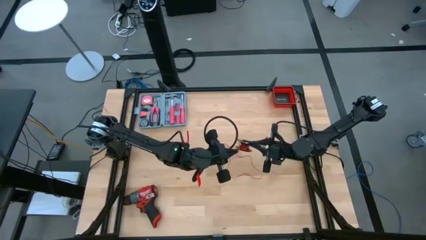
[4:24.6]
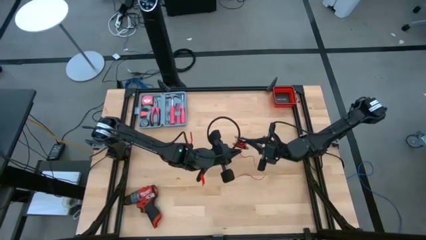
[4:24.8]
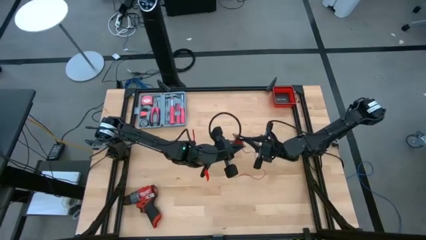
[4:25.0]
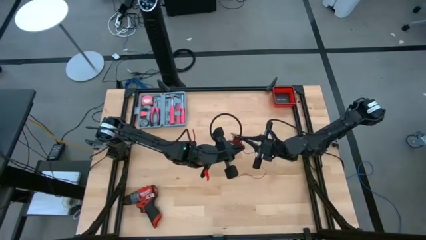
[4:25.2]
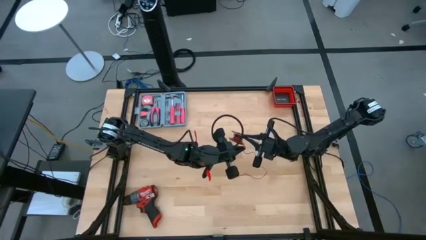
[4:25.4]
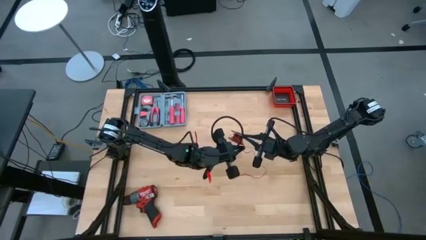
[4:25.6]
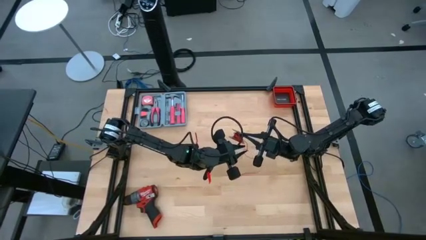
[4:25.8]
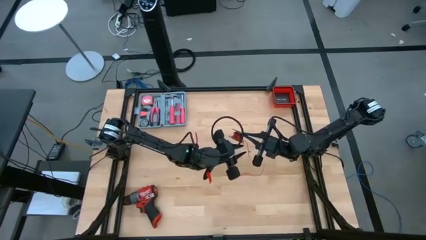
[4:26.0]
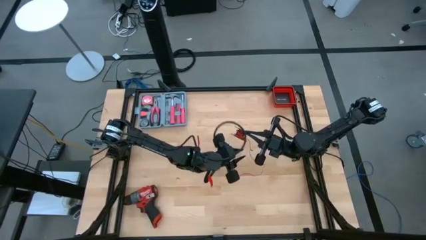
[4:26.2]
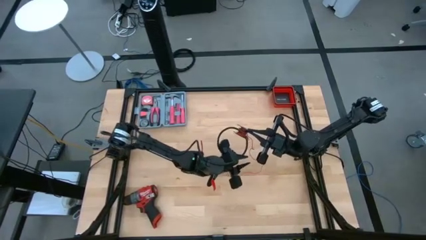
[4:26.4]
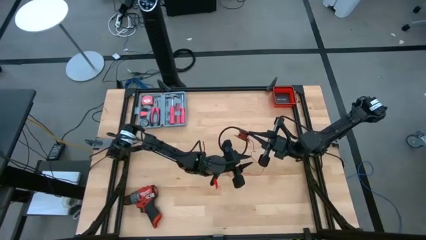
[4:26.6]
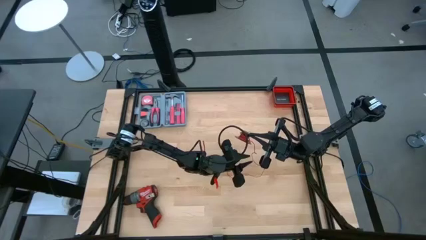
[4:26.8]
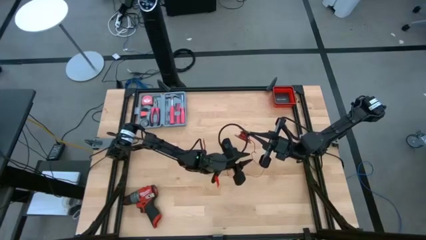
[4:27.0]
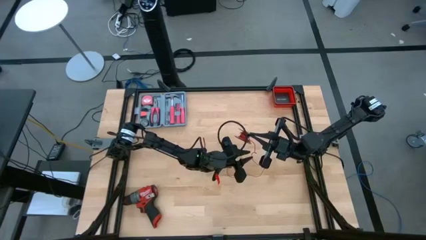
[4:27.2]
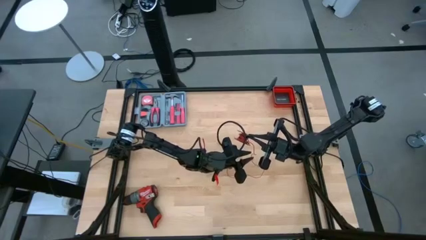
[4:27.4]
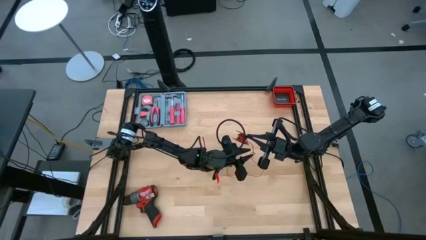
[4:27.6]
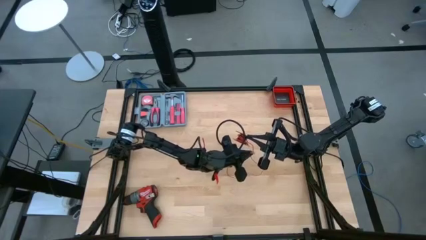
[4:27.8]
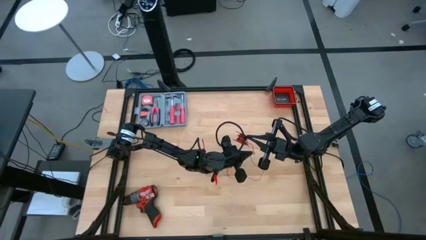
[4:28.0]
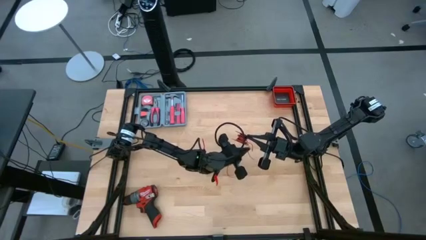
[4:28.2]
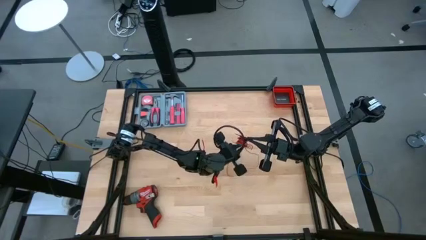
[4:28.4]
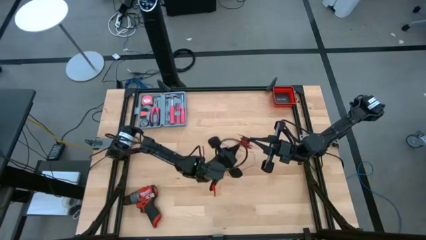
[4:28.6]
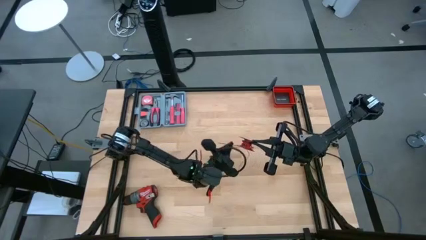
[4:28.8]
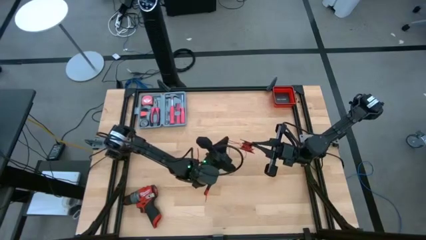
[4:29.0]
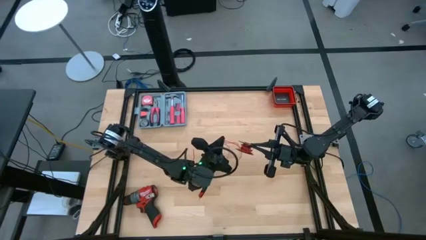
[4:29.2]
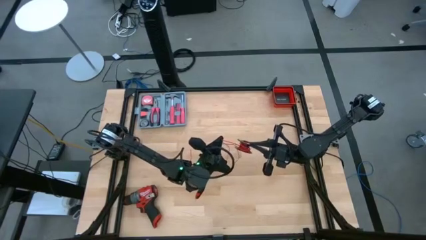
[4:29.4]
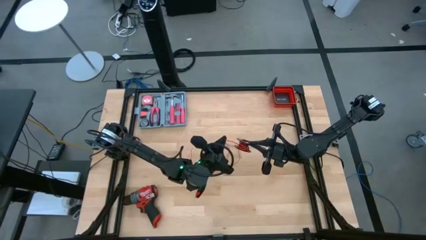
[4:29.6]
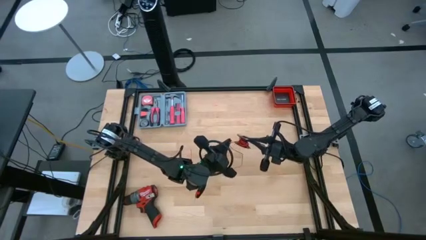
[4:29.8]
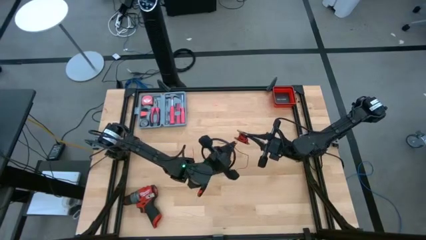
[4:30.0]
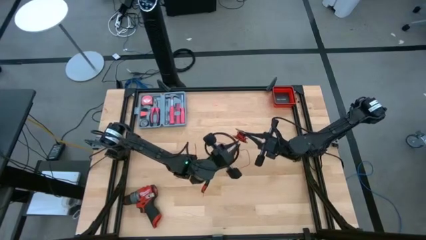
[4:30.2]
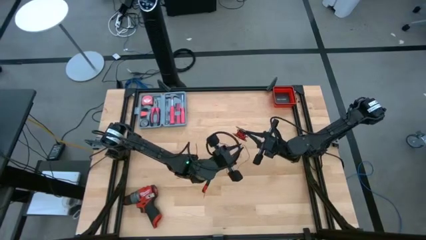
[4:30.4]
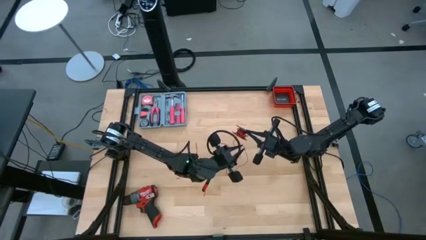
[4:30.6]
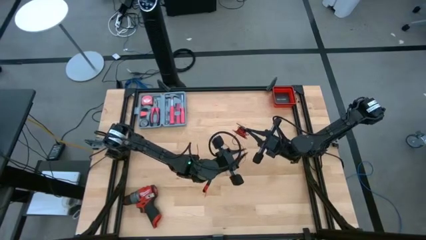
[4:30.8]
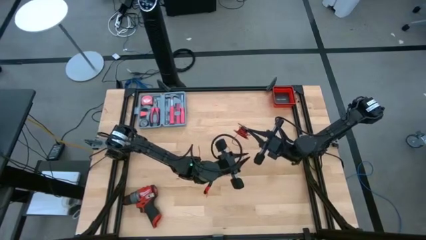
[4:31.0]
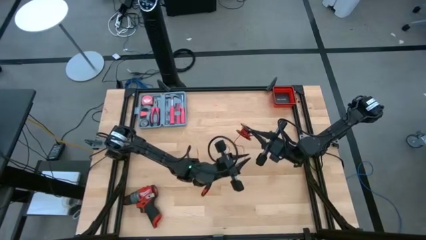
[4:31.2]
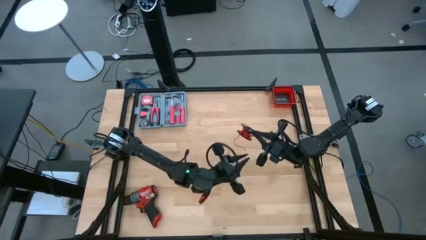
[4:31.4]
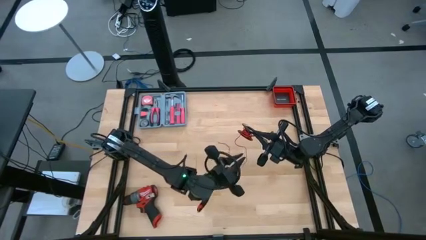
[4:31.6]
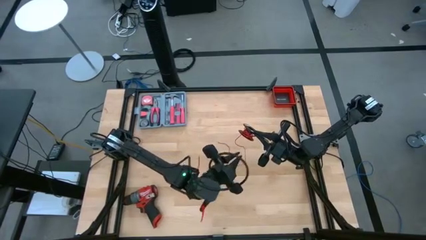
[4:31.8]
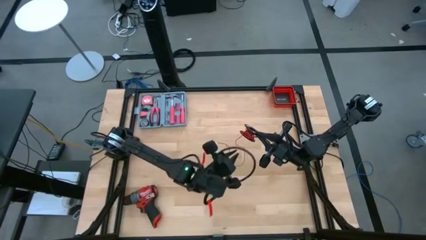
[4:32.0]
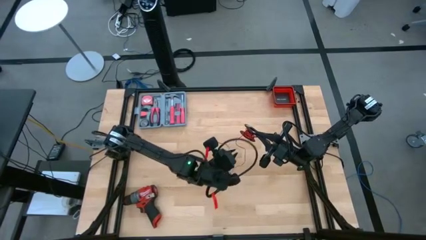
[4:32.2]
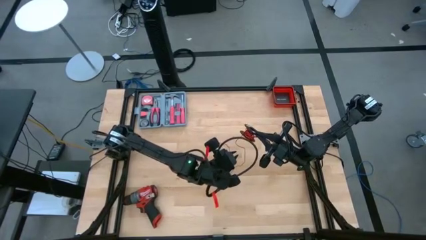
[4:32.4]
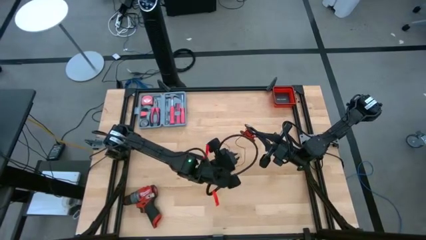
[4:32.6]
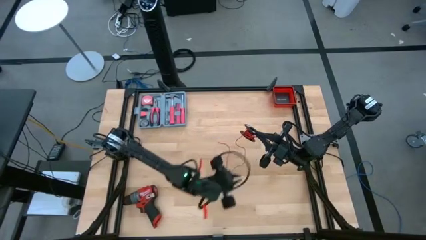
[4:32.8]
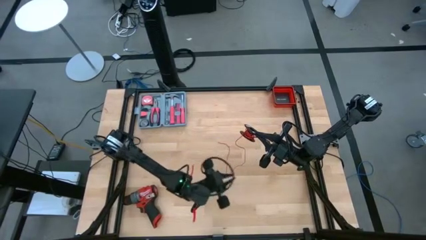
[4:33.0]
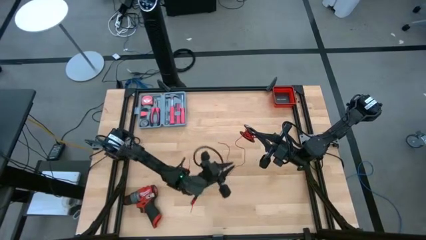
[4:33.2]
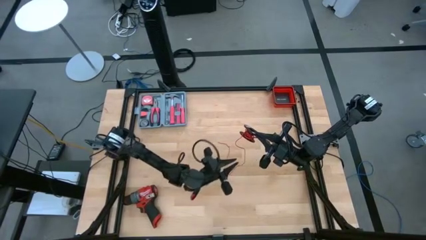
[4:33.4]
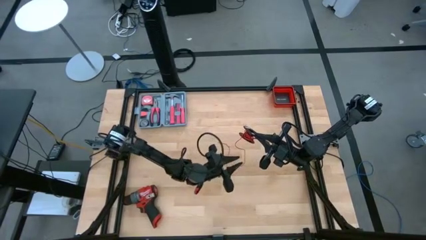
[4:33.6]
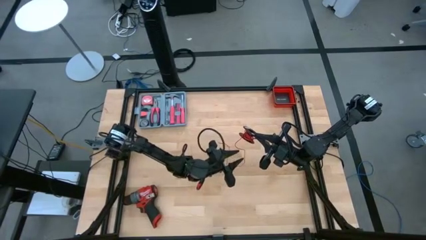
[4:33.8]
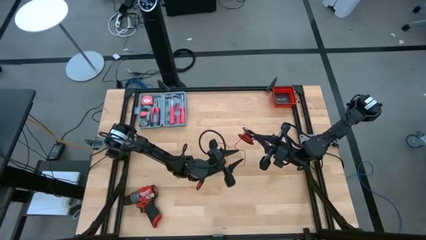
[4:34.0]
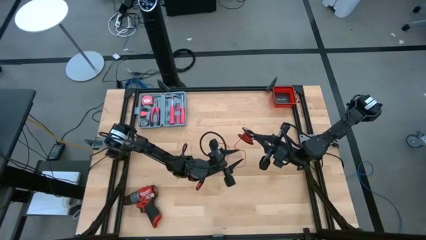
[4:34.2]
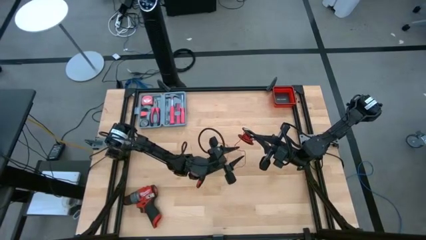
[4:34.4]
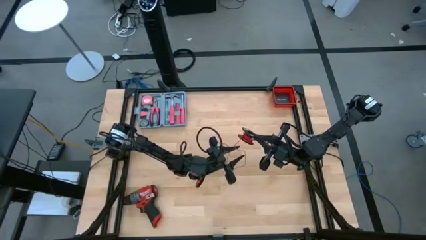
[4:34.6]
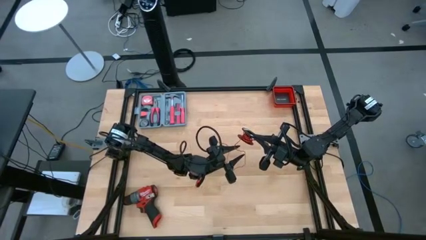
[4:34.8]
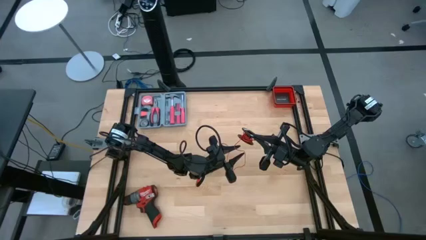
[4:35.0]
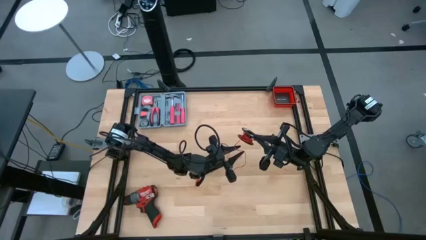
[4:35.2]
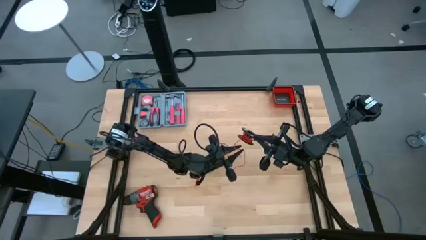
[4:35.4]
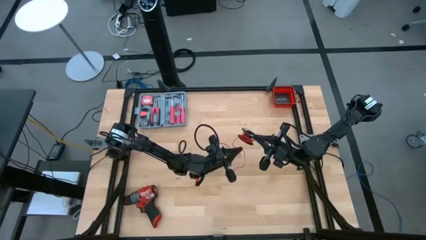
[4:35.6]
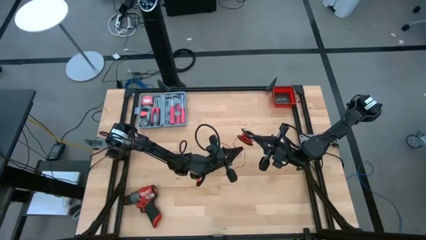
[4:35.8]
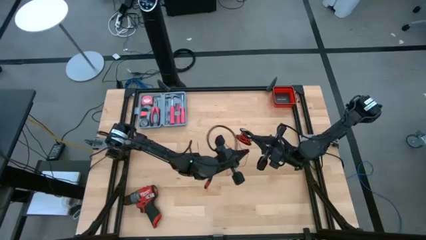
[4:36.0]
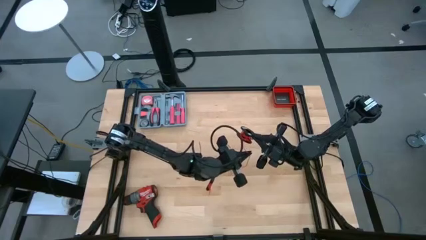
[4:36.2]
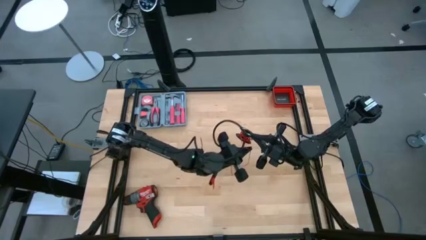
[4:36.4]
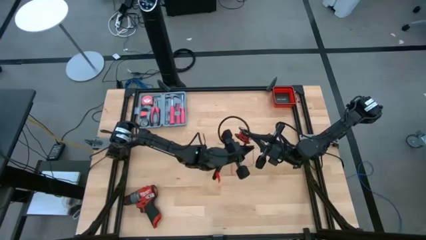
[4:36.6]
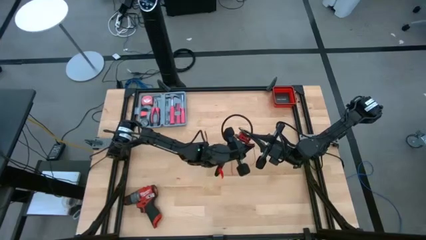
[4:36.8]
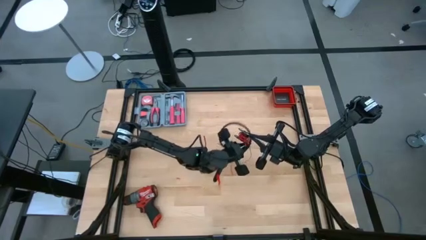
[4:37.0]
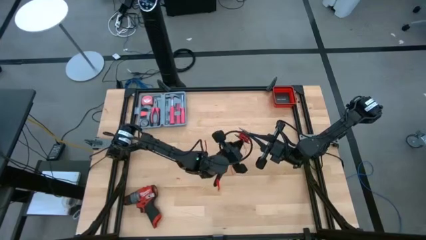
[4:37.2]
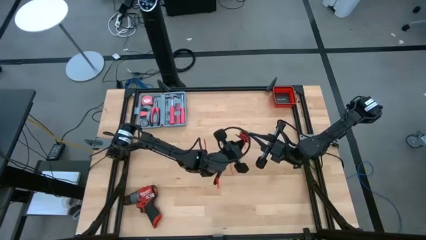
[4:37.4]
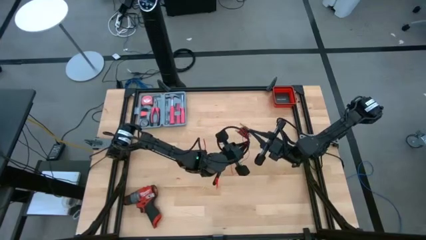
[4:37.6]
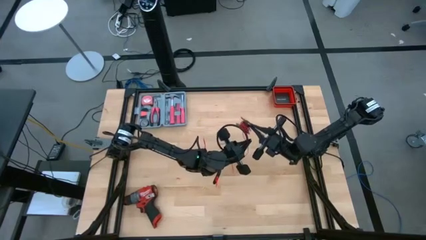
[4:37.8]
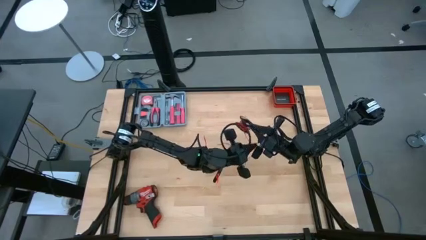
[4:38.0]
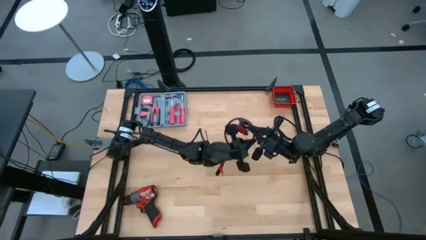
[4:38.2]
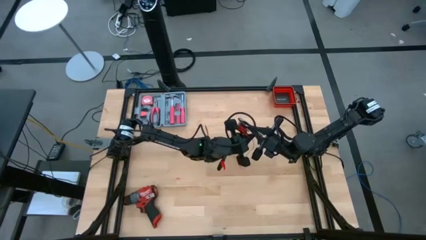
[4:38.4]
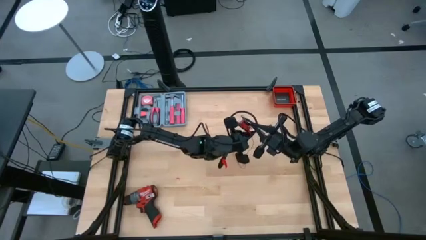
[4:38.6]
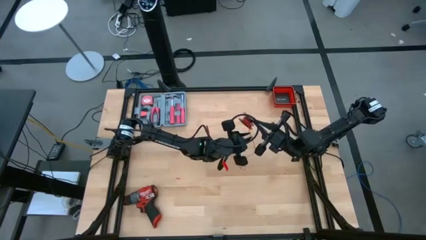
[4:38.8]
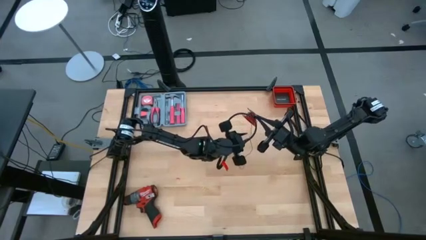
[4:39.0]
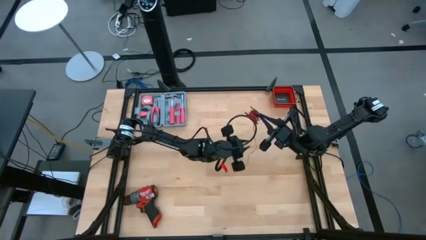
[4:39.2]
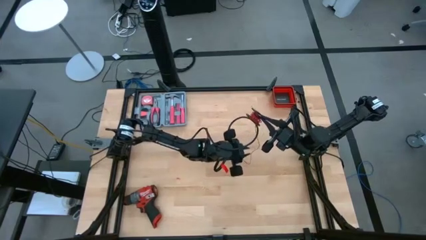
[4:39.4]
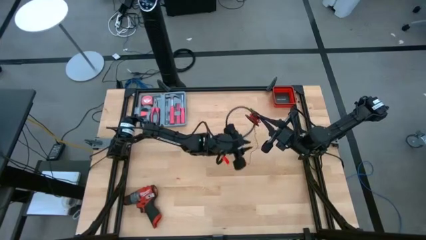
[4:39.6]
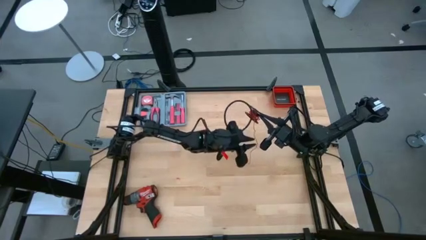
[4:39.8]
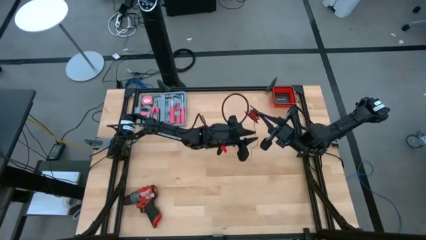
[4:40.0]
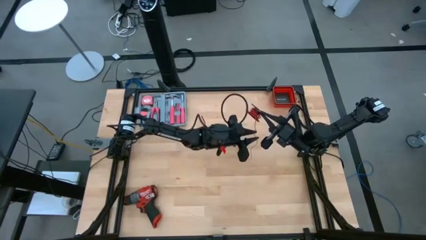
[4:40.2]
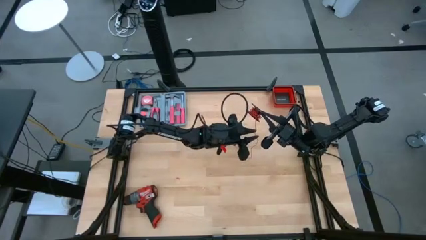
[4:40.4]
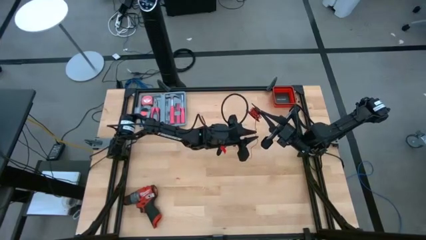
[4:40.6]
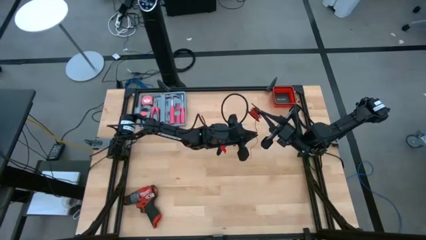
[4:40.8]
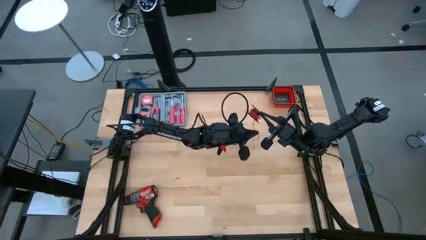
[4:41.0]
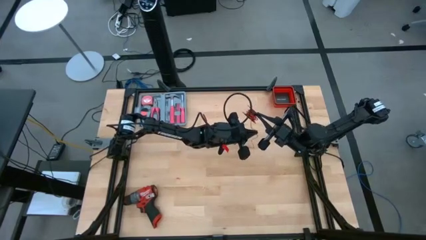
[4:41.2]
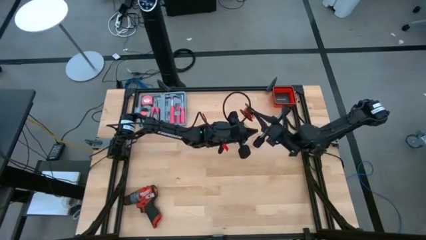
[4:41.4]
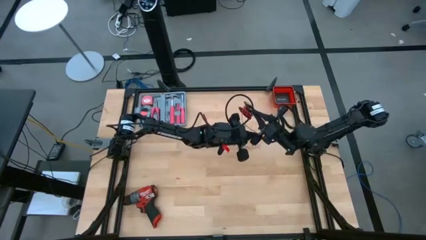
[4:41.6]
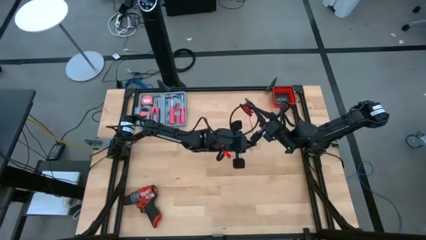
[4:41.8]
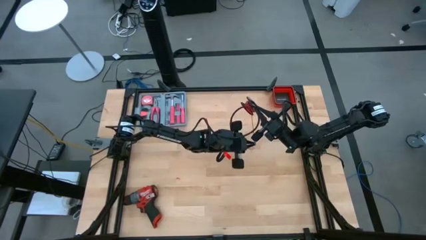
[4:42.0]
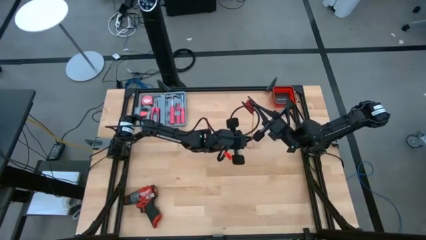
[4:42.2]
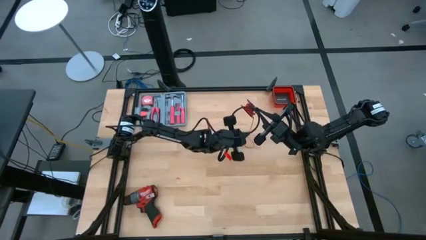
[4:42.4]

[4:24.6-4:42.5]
Task: Coil cords
Coil the red wire on the black spool
